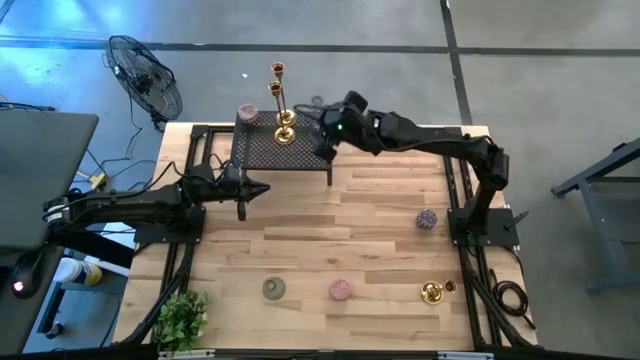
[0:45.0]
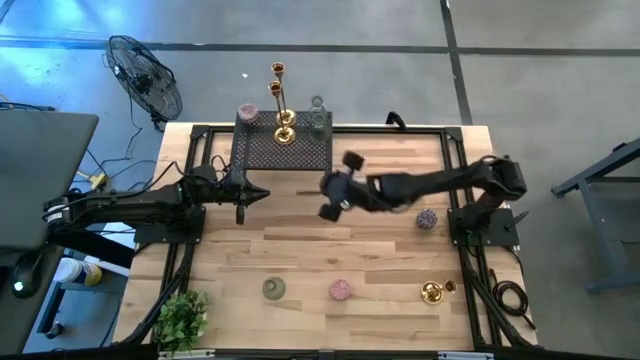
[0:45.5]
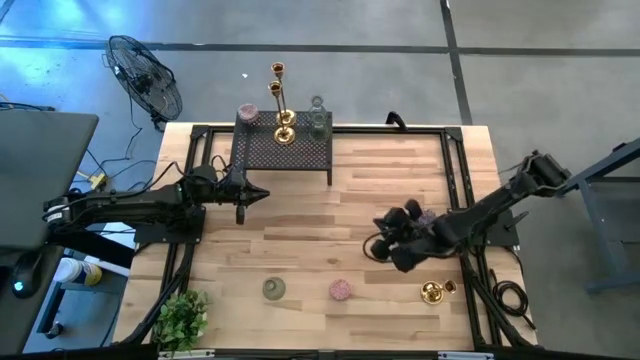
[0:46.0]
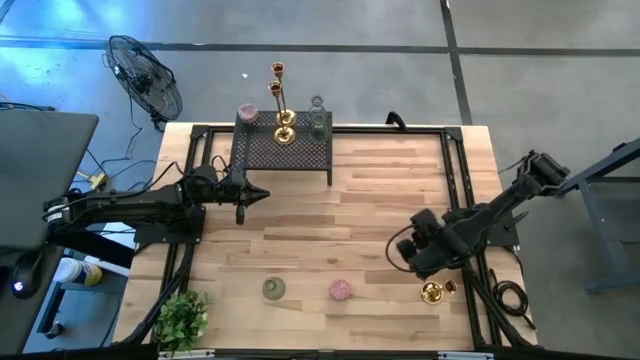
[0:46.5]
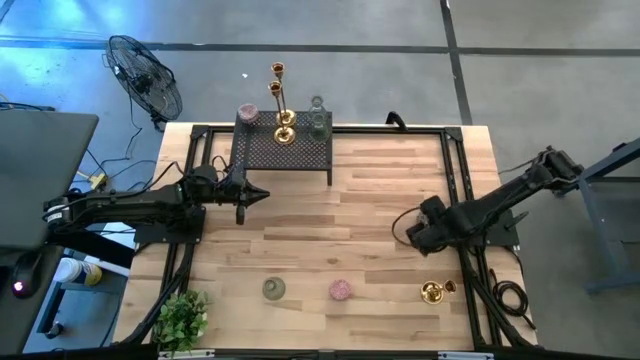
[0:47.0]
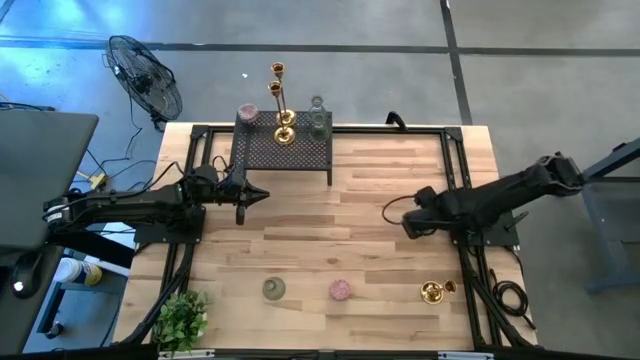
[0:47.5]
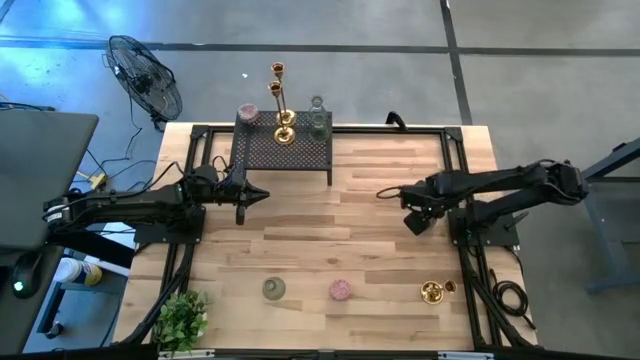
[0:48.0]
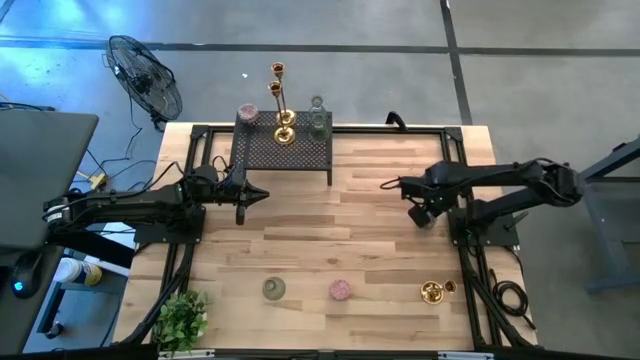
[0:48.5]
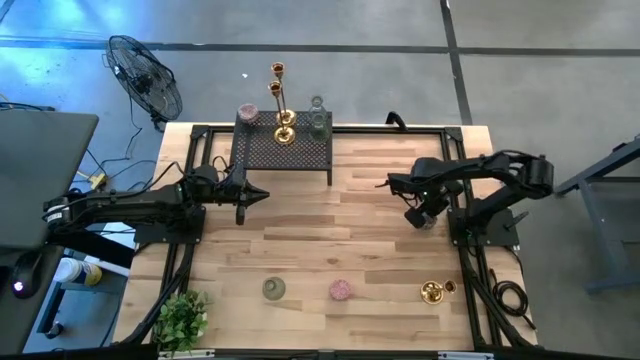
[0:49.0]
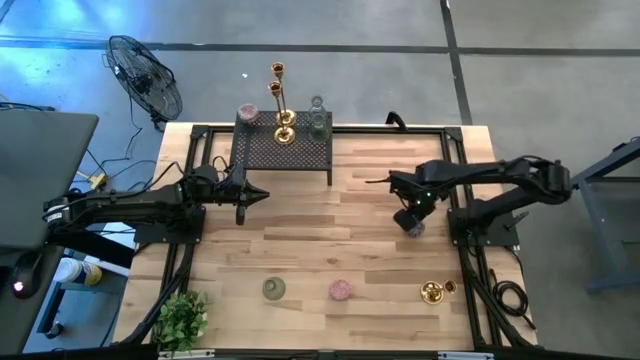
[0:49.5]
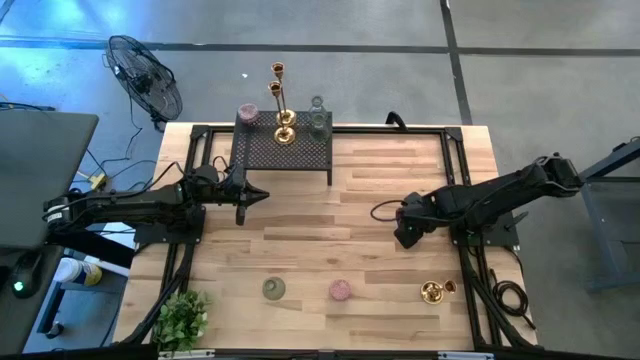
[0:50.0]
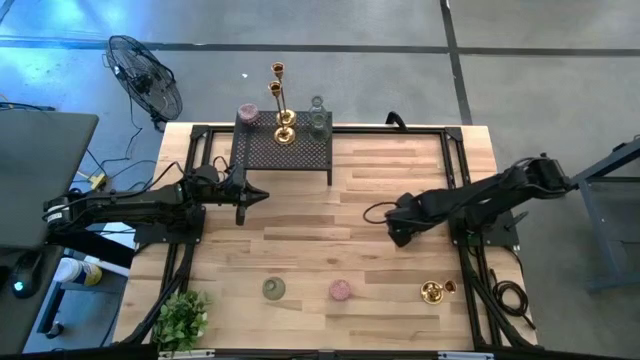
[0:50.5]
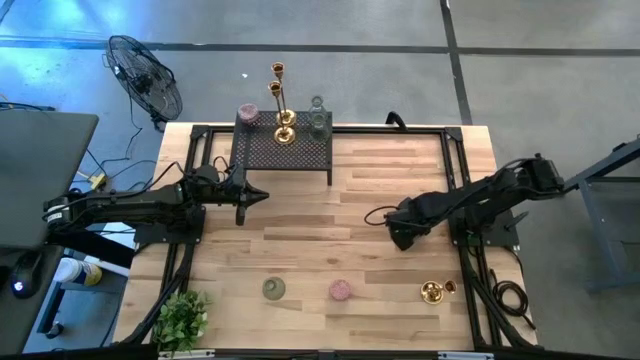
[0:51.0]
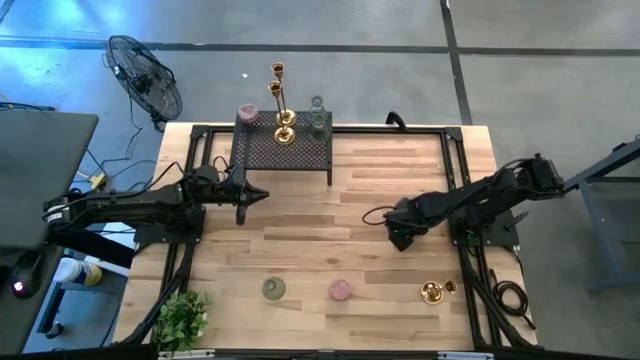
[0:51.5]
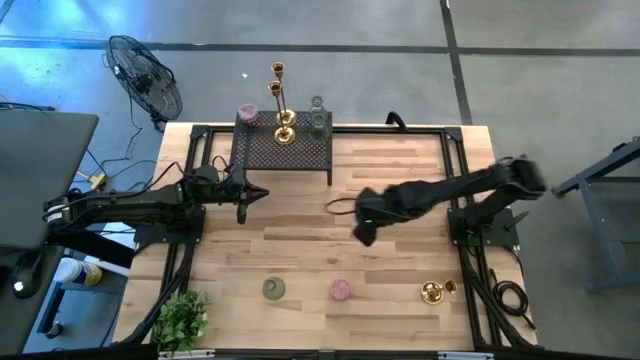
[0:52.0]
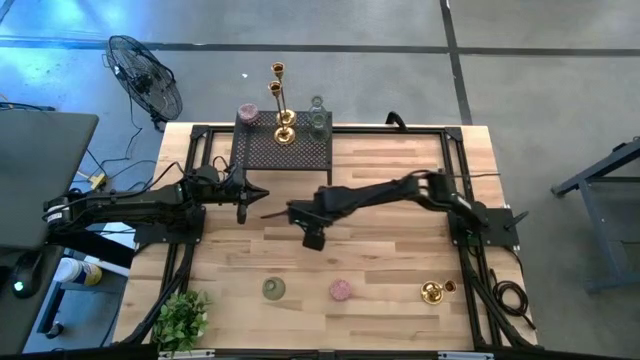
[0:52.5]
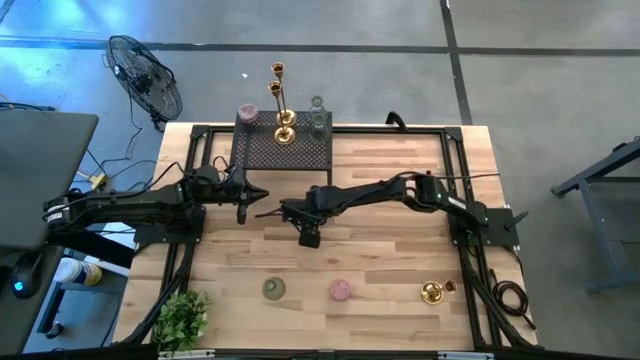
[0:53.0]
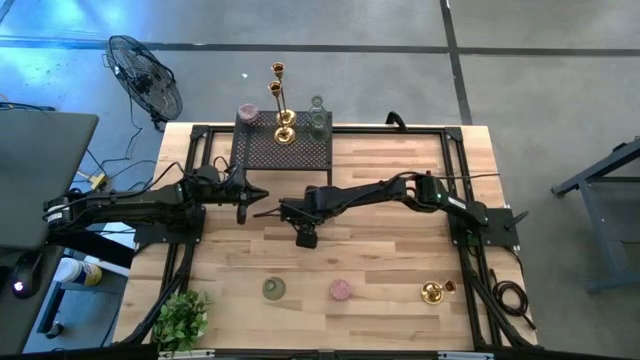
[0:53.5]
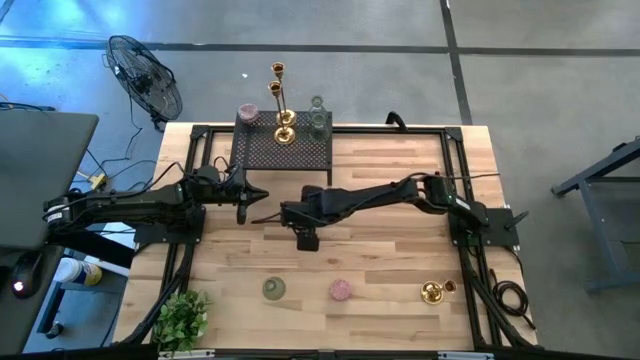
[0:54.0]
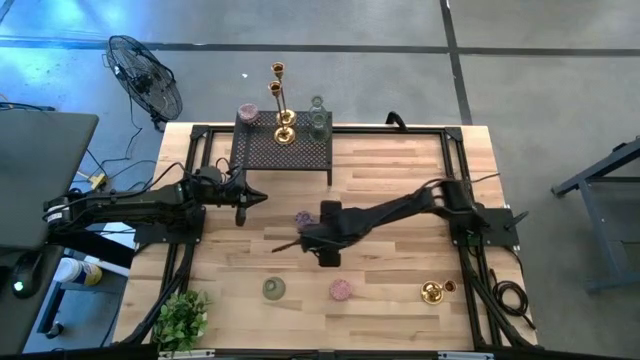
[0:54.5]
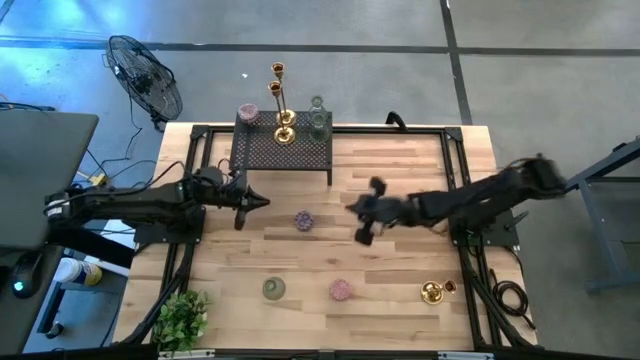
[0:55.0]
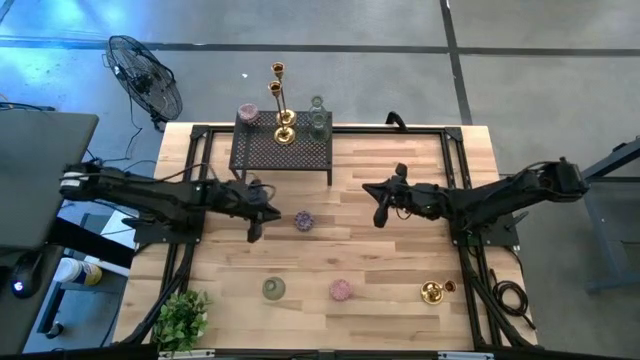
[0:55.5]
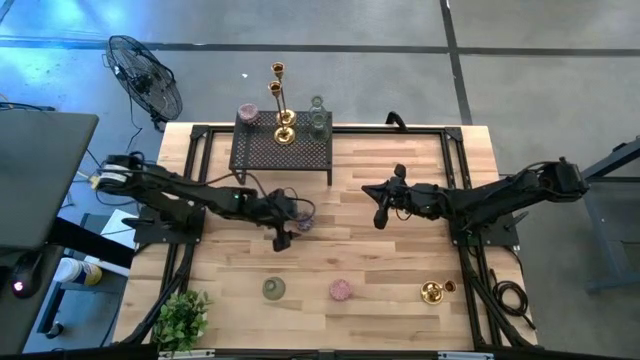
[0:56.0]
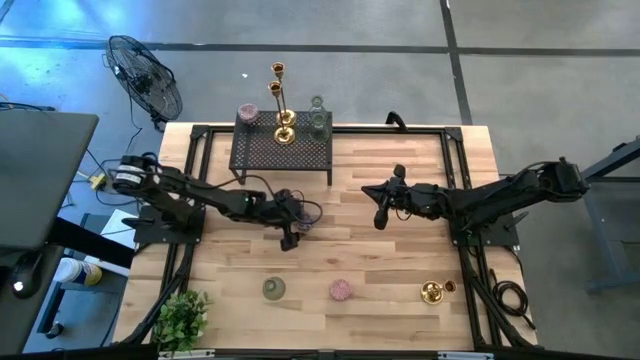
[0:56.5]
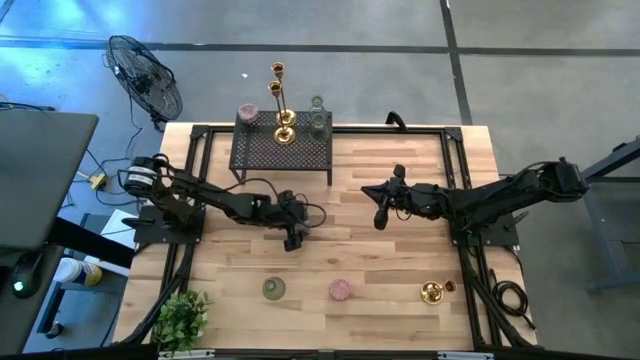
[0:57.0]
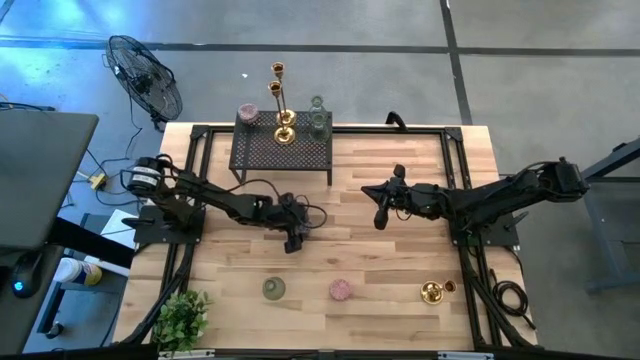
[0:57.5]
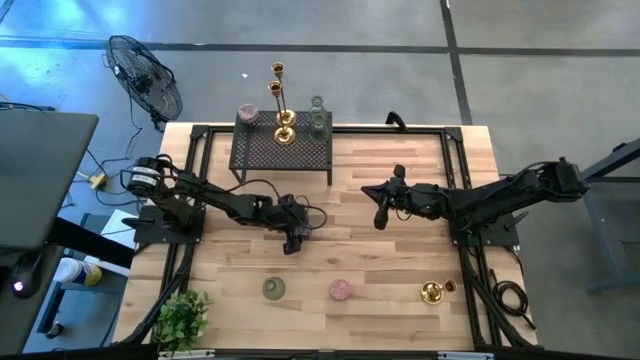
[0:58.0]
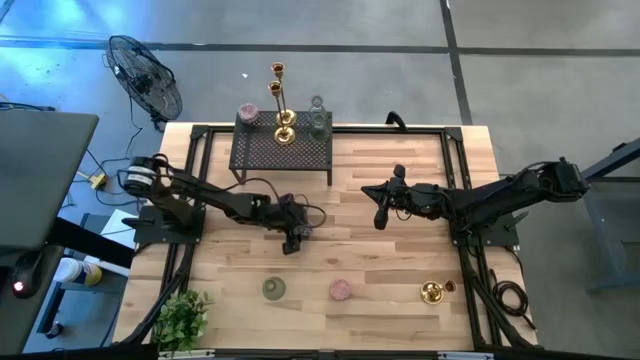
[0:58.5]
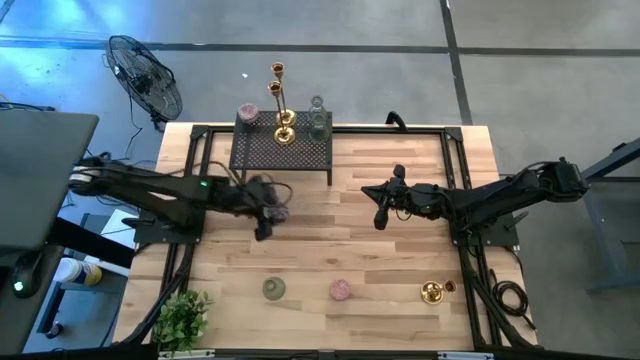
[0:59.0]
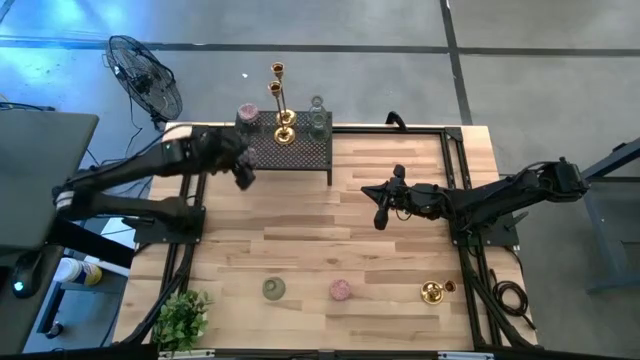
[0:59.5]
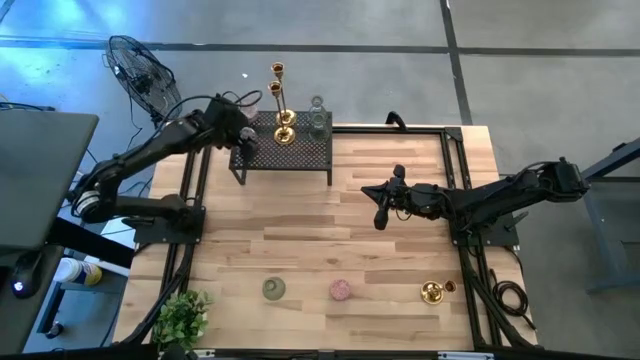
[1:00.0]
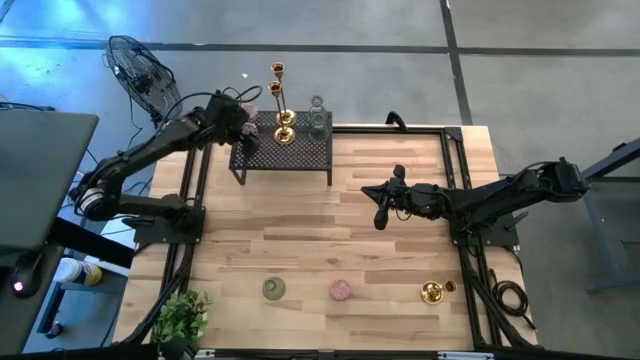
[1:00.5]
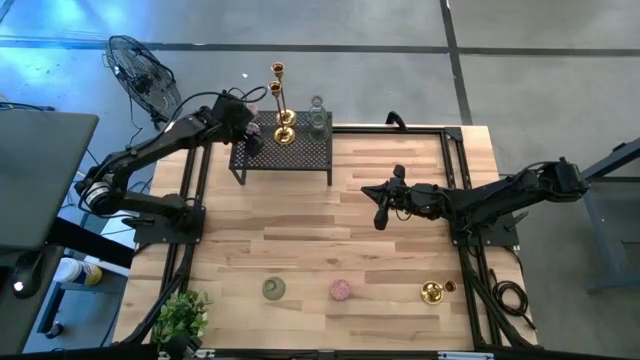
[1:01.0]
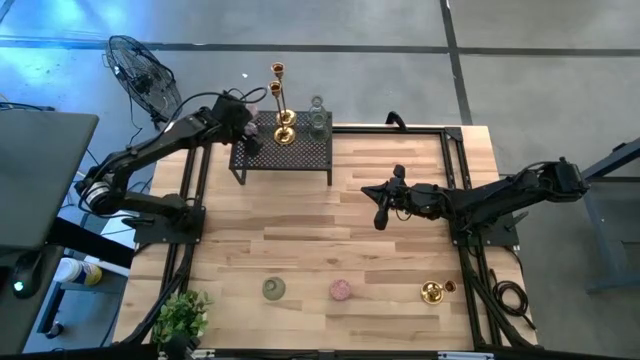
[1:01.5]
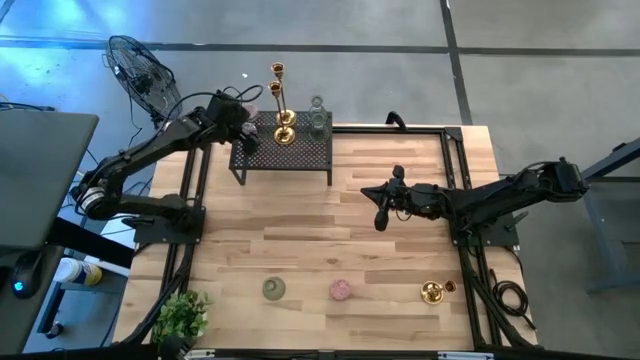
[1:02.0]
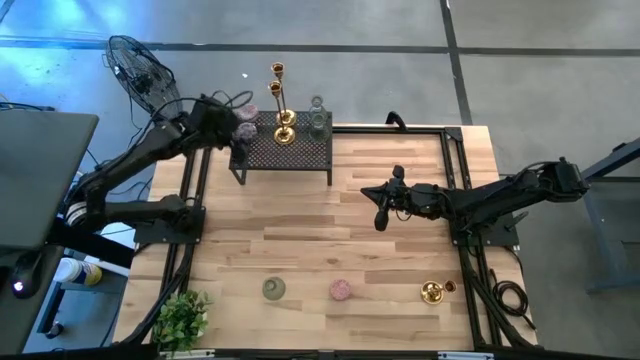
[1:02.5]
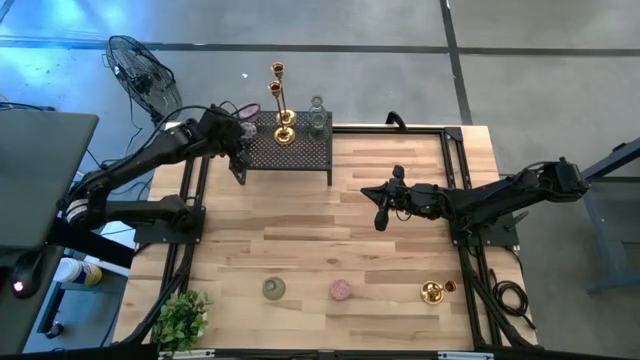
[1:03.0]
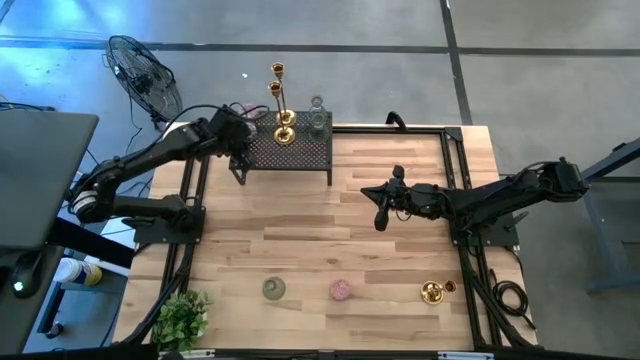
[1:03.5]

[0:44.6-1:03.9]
Task: Pick & Place candle stick holders
Put the black and red scented candle on the shelf

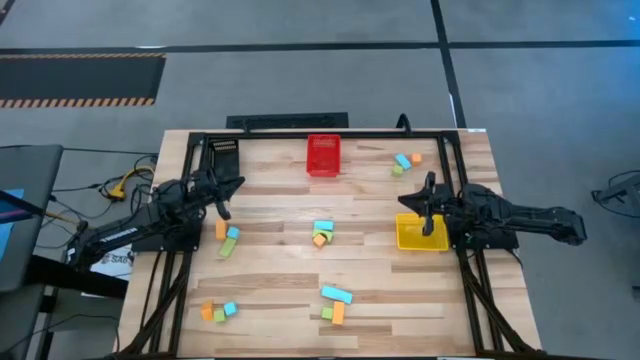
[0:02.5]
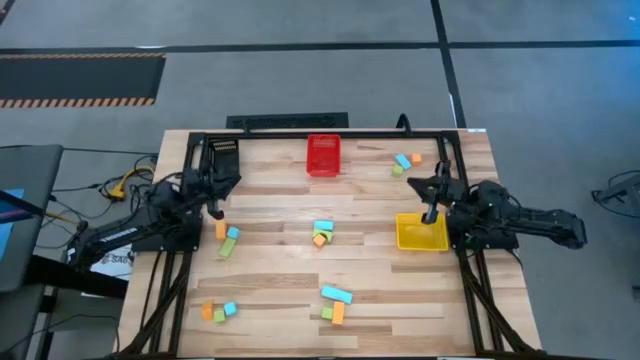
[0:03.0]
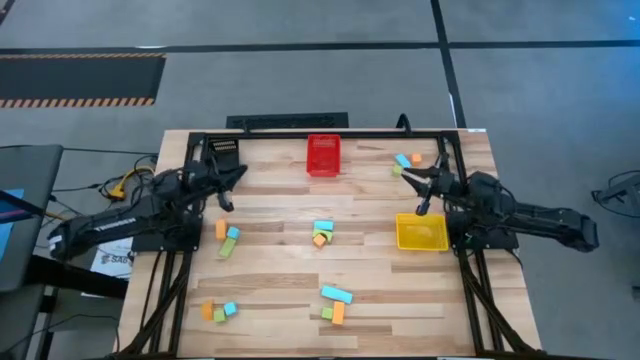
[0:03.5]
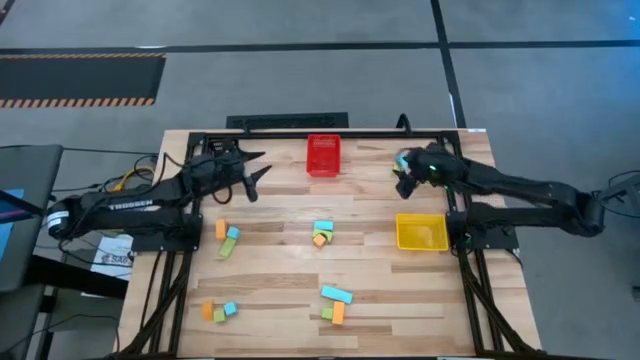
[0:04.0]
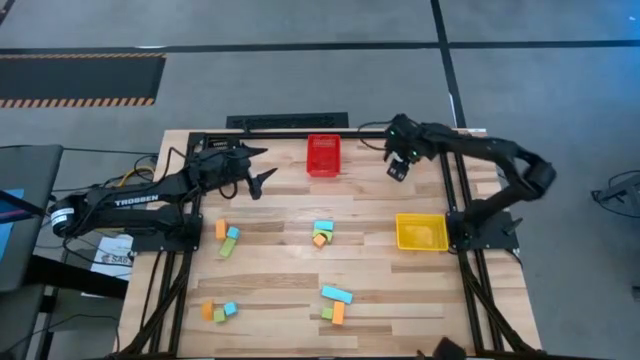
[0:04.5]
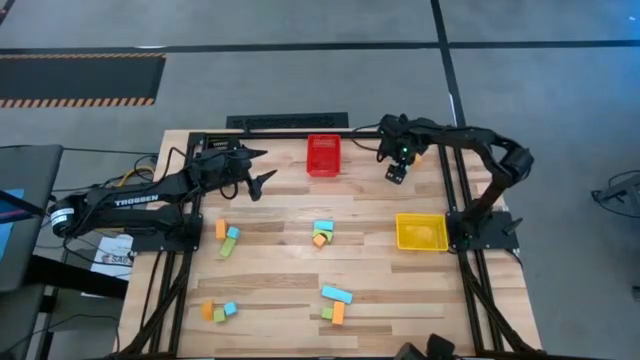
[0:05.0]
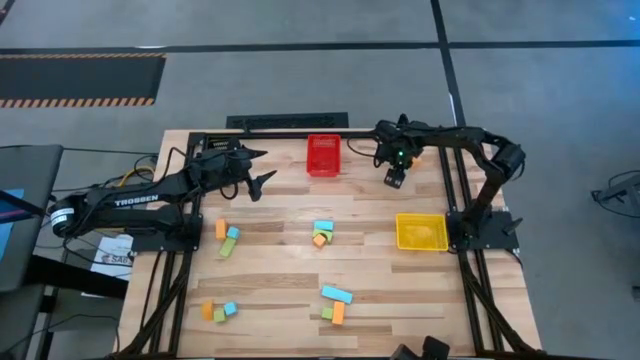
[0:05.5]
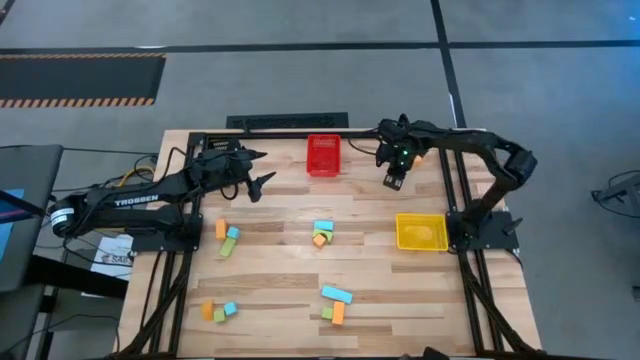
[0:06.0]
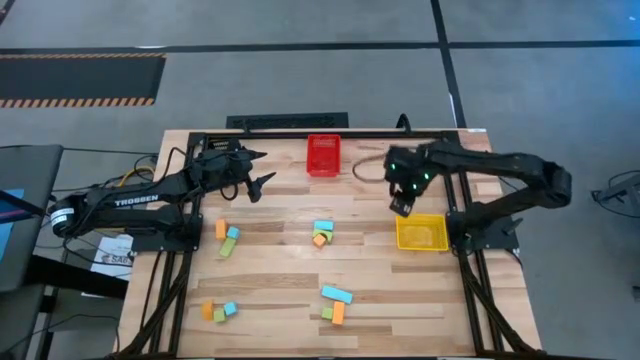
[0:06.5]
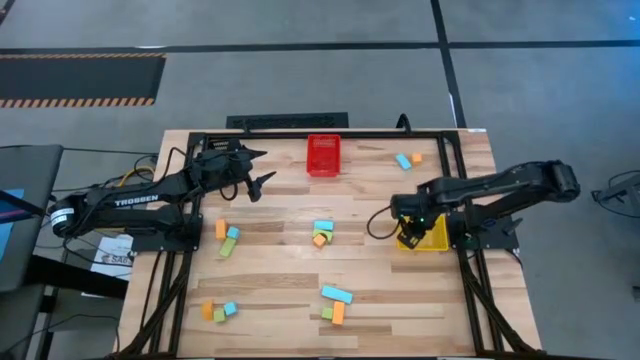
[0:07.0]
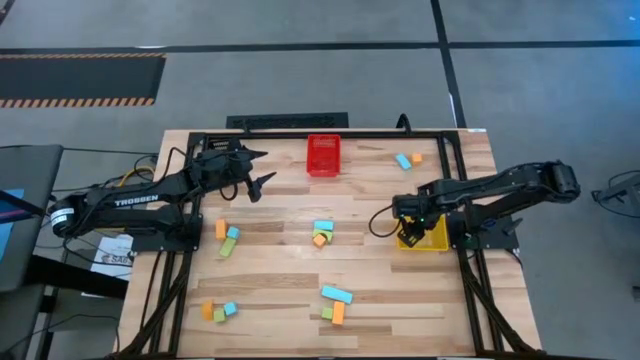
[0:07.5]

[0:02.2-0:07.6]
Task: Sort & place blocks by color
Put the green block into the yellow bin
